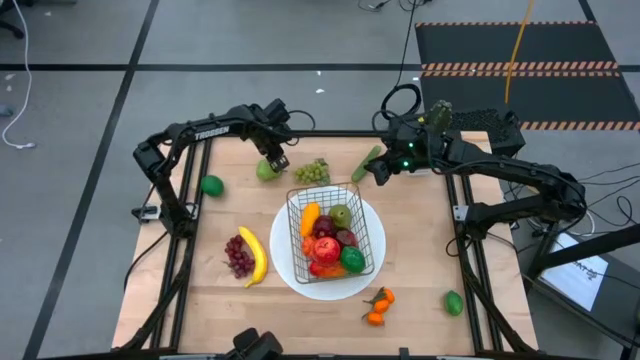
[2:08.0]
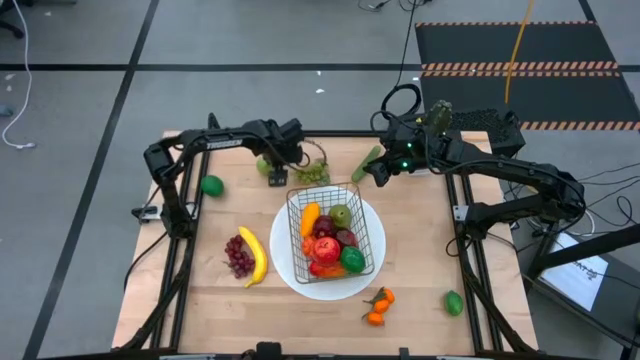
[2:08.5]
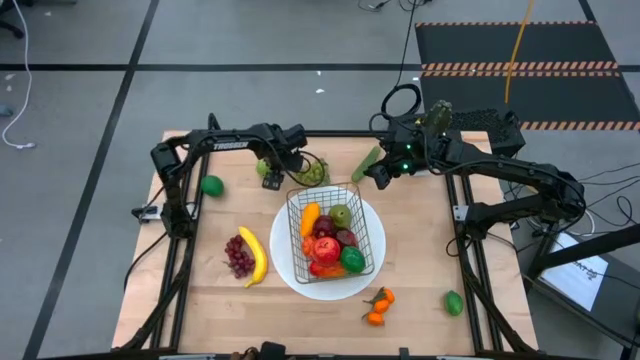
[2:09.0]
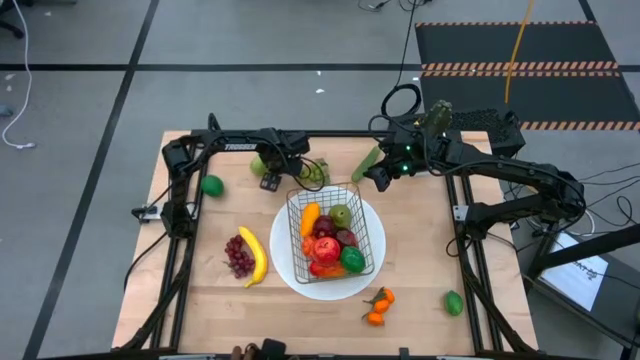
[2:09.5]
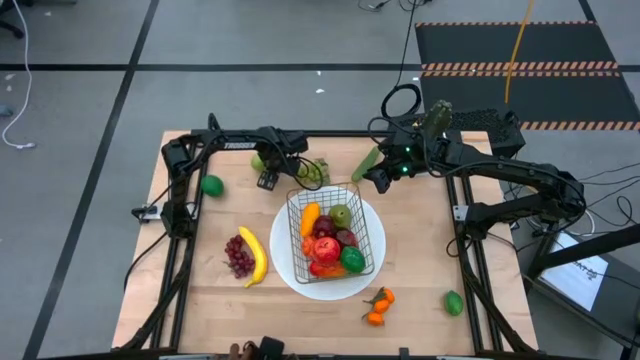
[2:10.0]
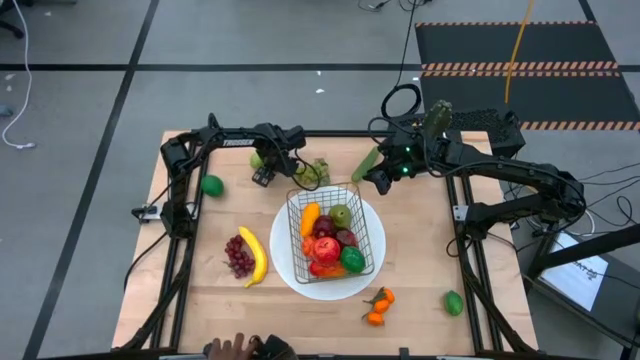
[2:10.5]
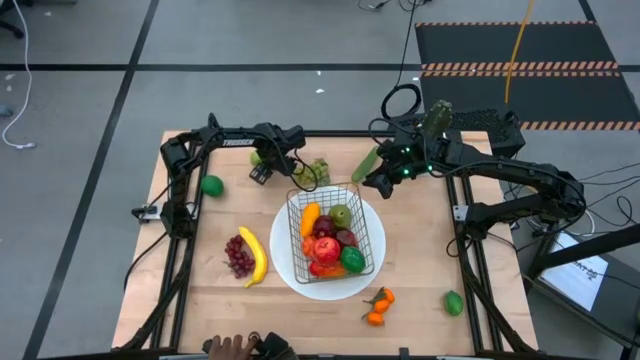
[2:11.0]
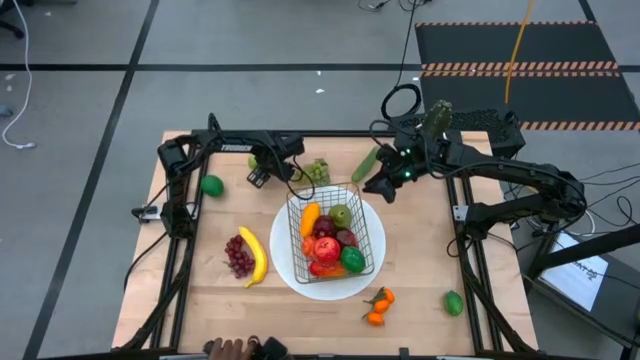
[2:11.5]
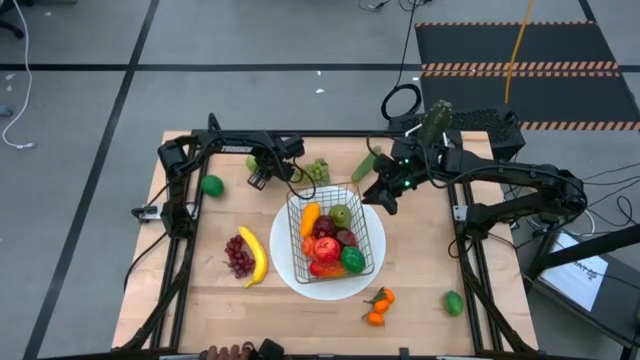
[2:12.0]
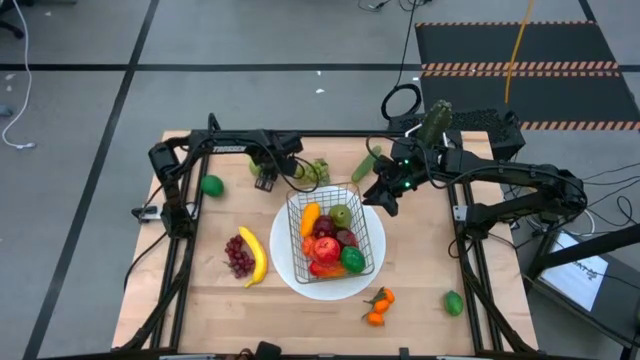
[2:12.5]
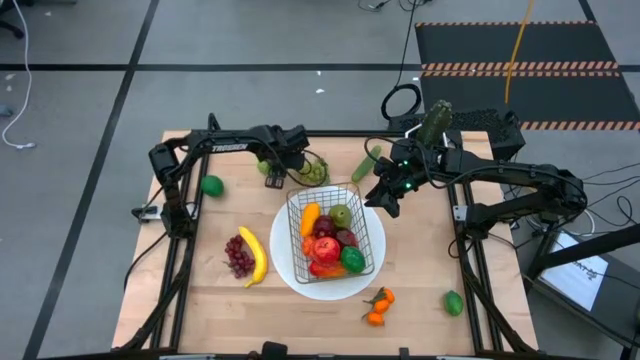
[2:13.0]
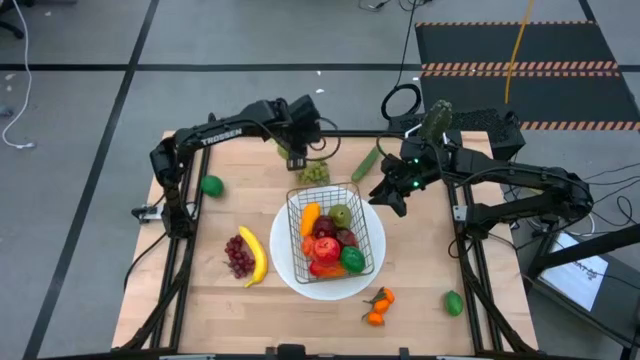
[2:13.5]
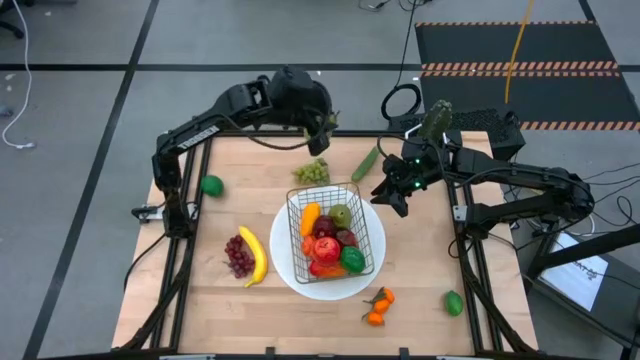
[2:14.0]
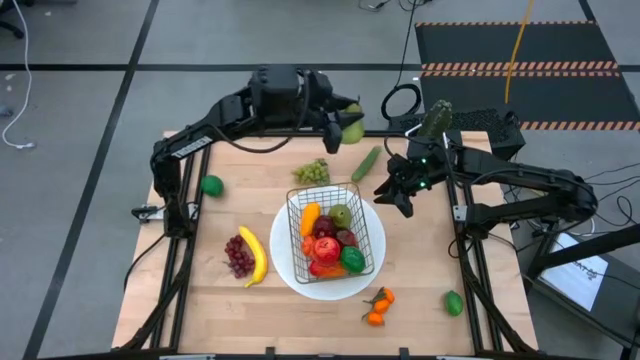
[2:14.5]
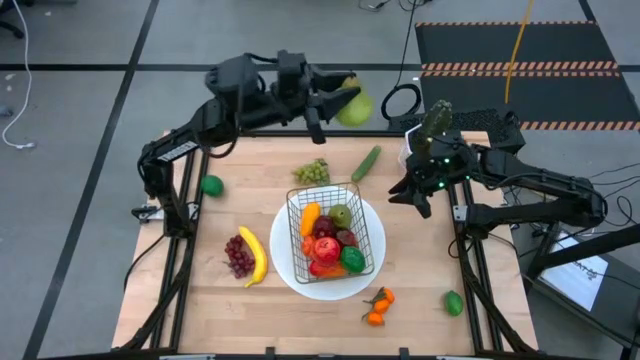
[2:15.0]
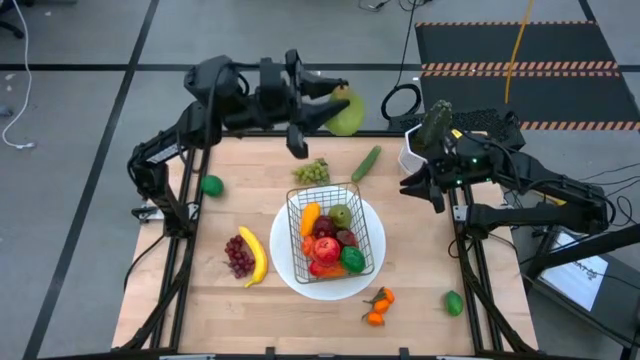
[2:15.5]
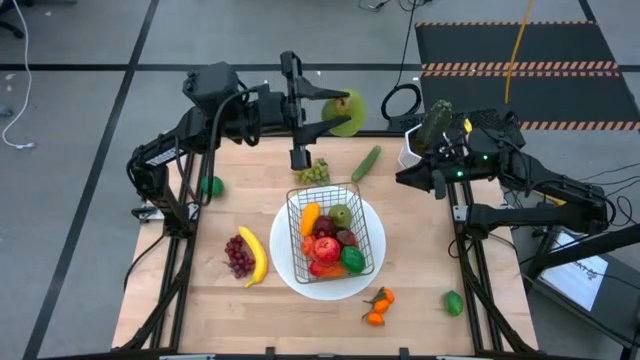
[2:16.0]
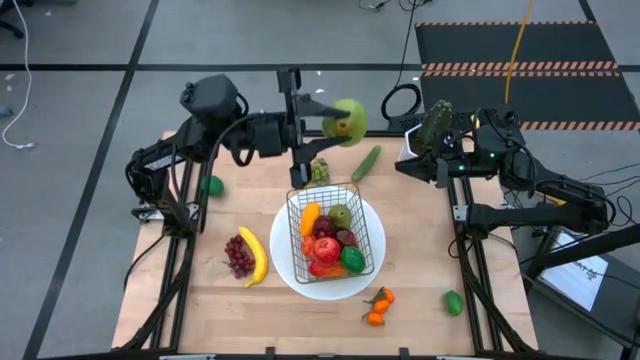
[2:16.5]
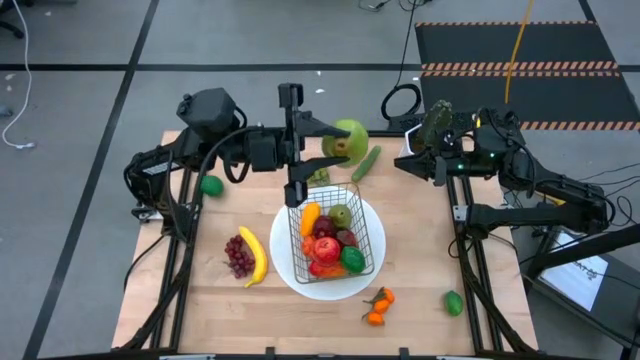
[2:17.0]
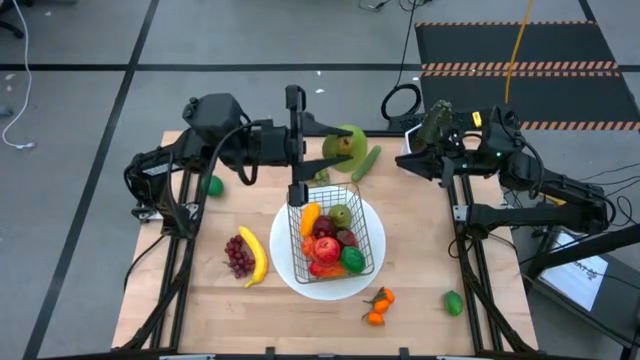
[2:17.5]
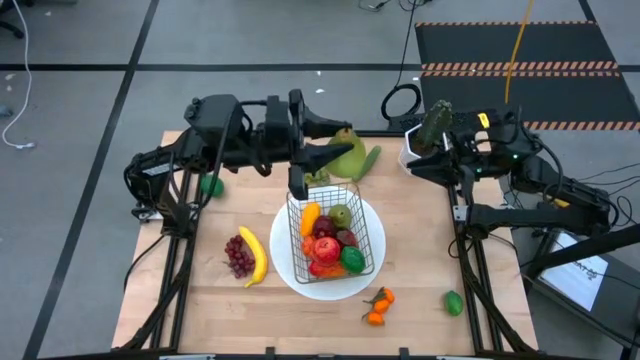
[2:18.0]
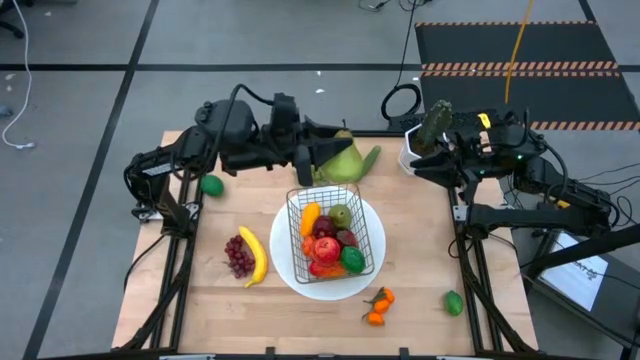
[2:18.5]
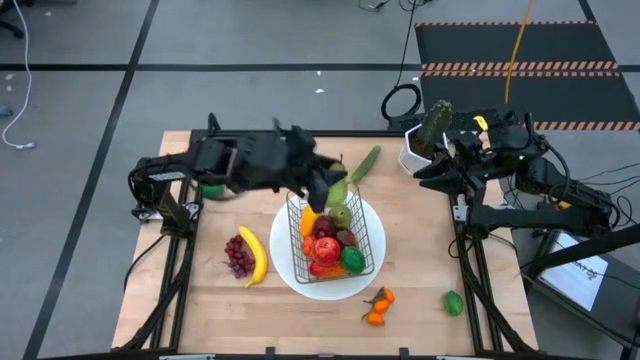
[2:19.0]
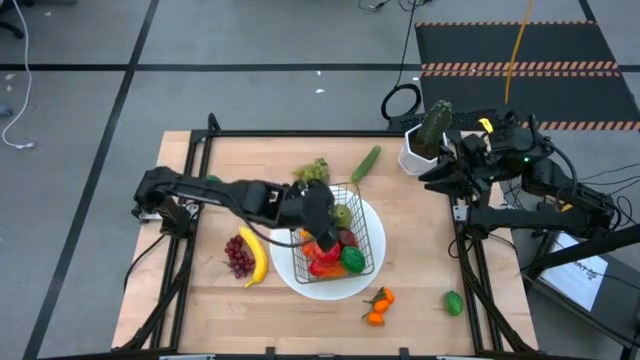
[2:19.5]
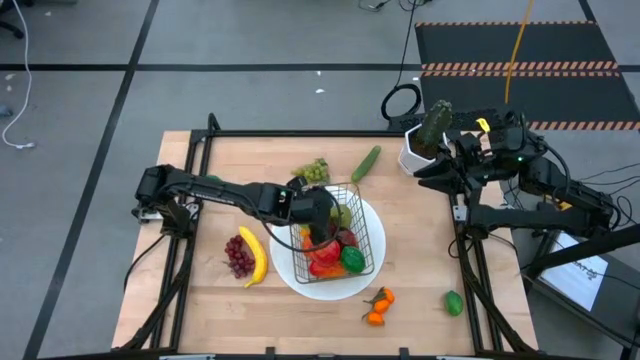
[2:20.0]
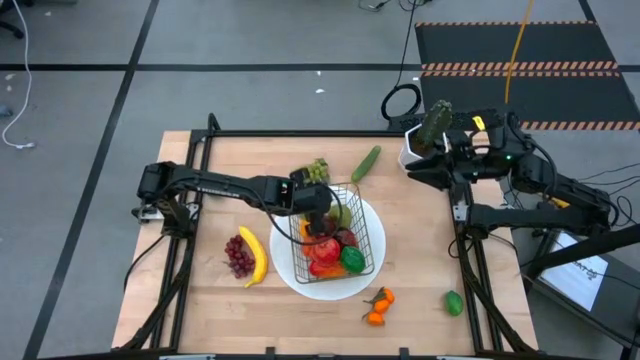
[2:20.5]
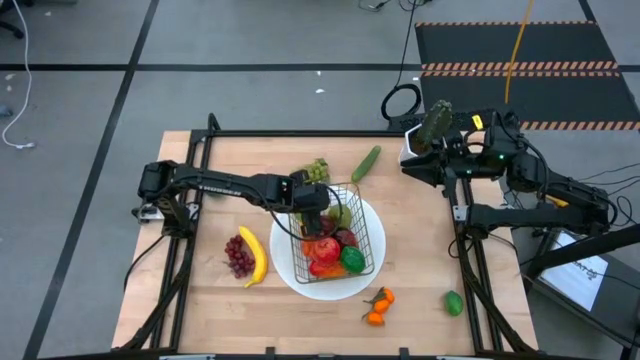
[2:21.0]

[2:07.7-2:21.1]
Task: Build produce basket
Put the green pear into the black wire basket

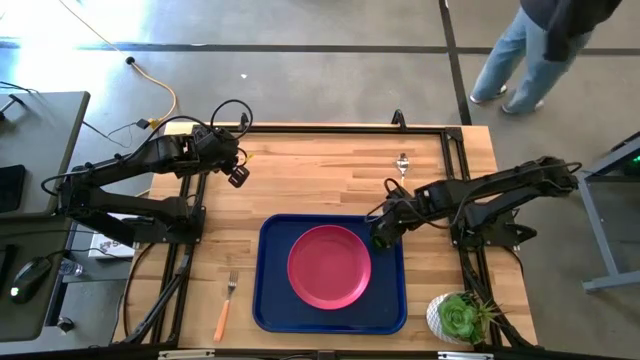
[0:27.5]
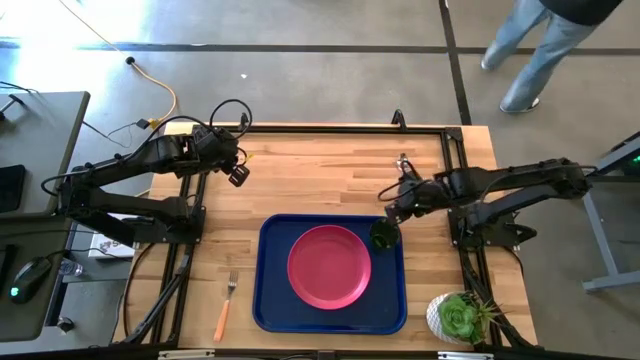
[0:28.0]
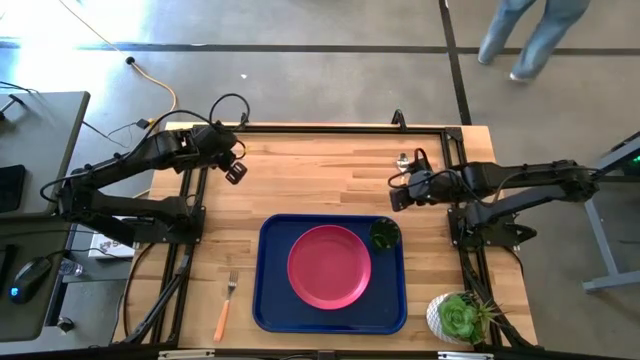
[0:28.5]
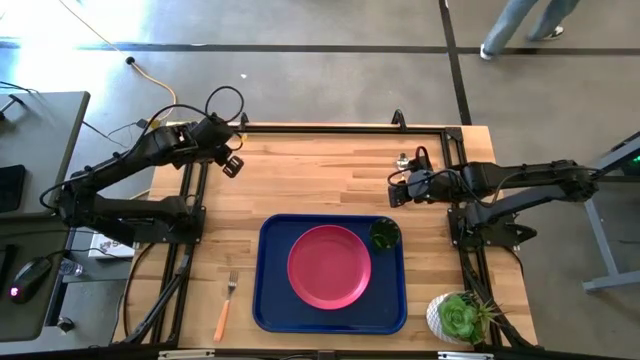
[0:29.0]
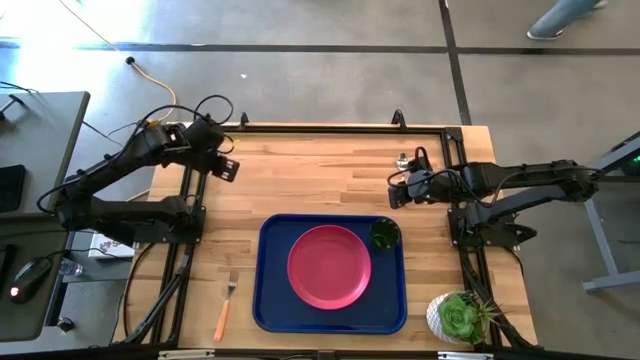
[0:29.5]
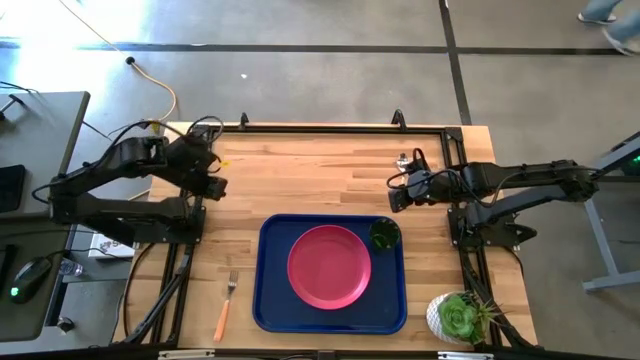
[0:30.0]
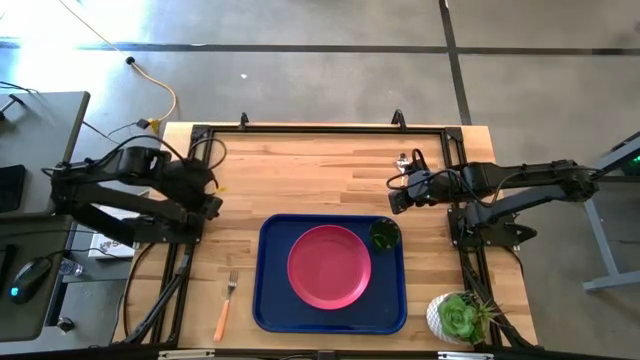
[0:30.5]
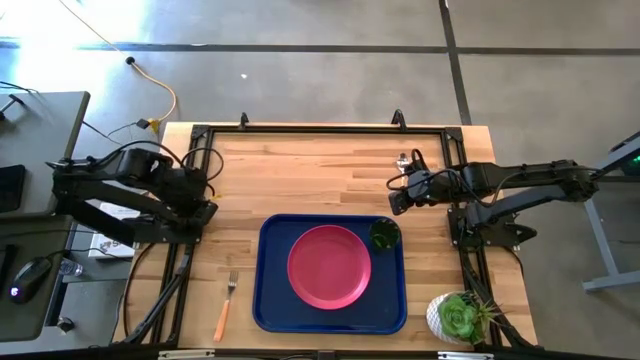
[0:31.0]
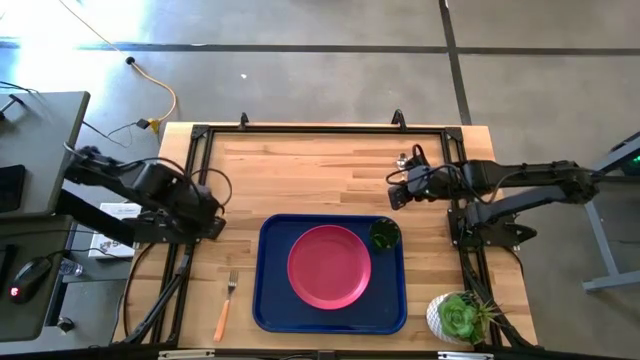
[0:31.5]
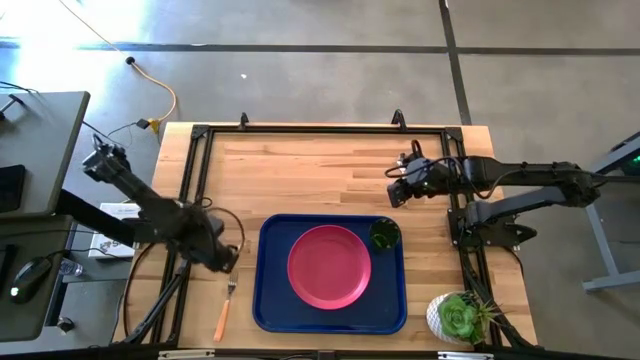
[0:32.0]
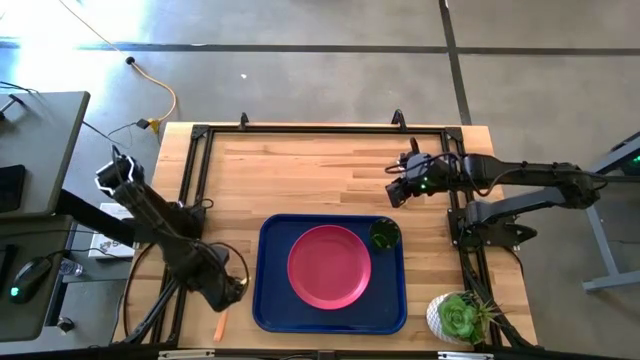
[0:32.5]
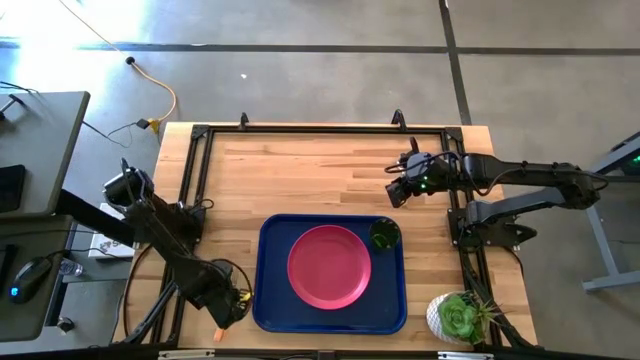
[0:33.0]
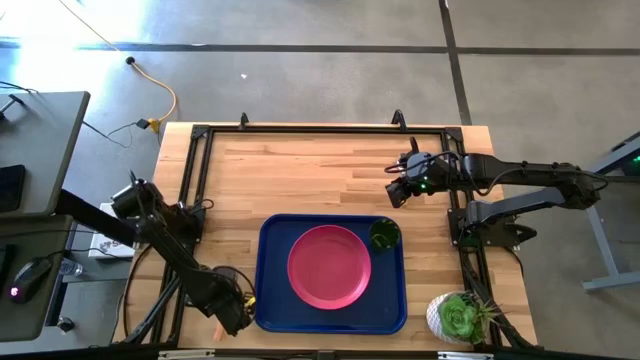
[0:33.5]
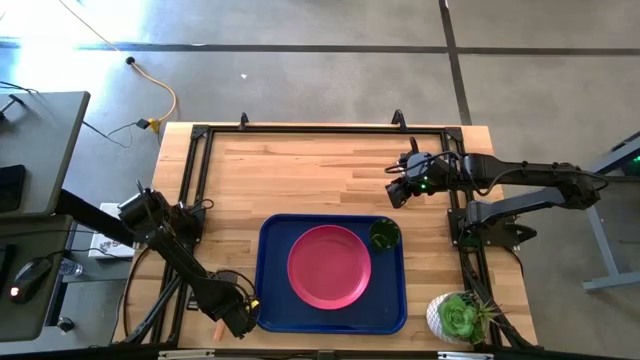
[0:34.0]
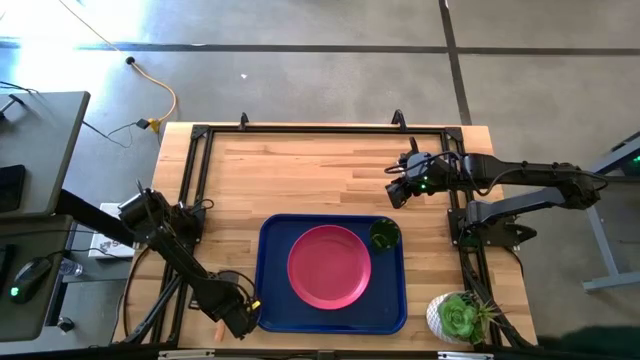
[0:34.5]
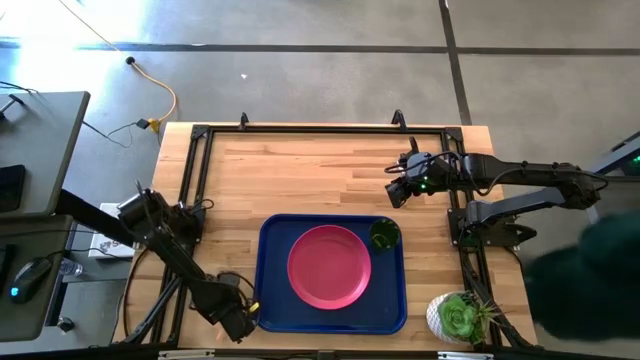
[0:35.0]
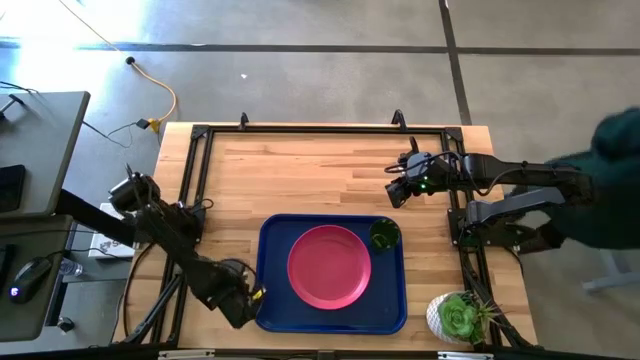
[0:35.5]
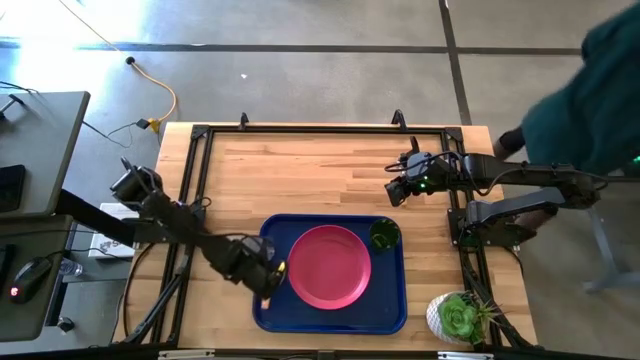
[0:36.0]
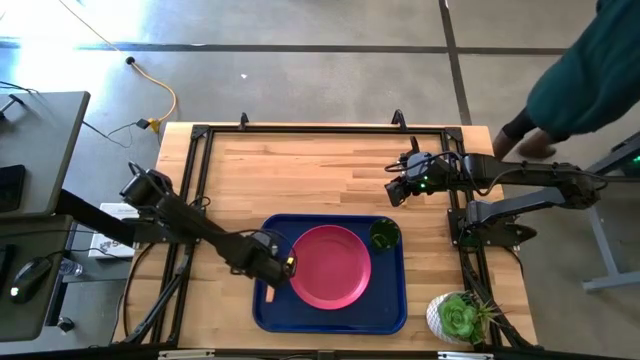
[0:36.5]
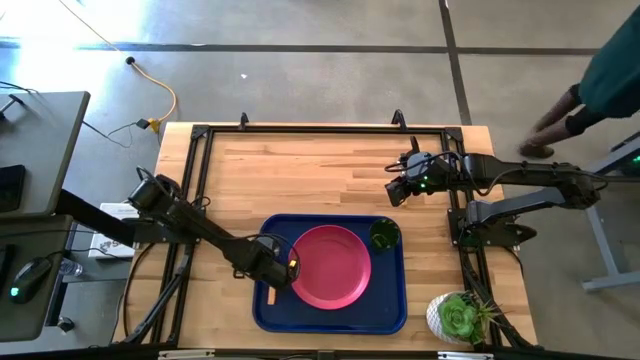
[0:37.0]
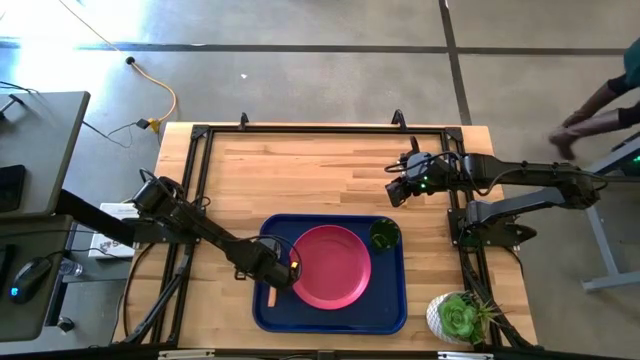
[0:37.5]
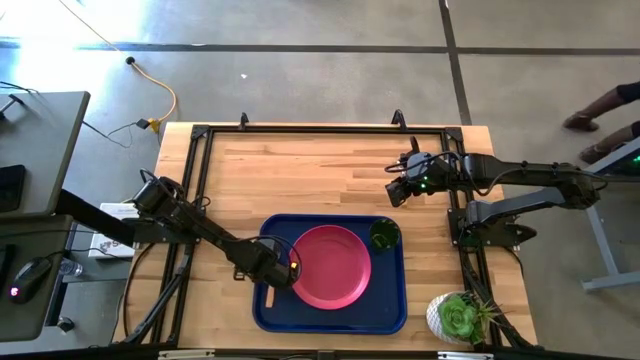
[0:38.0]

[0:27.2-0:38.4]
Task: Pick and place plate/cup/fork/spoon on tray
Put the yellow fork on the blue serving tray to the left of the pink plate
